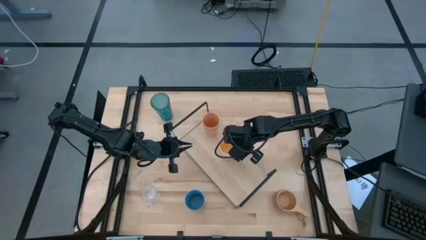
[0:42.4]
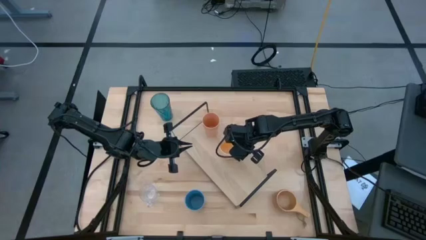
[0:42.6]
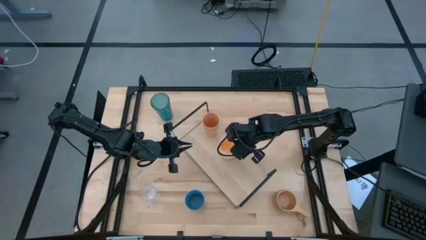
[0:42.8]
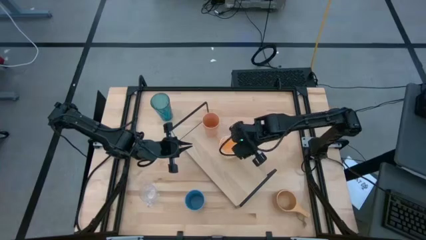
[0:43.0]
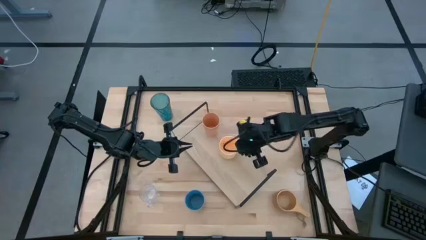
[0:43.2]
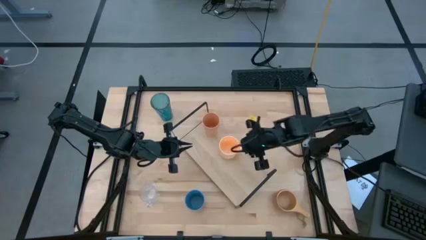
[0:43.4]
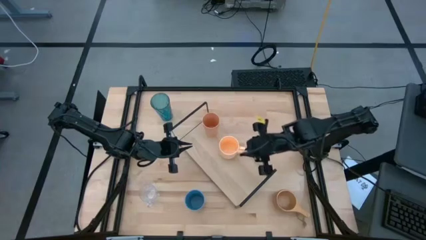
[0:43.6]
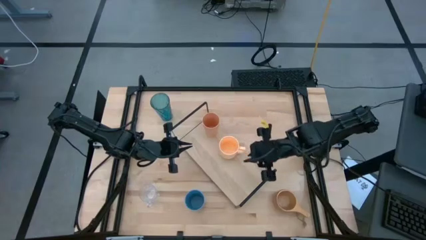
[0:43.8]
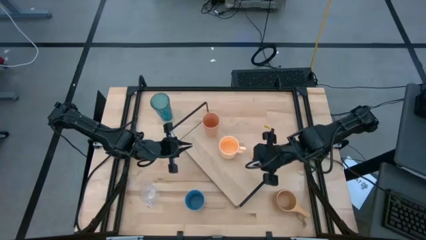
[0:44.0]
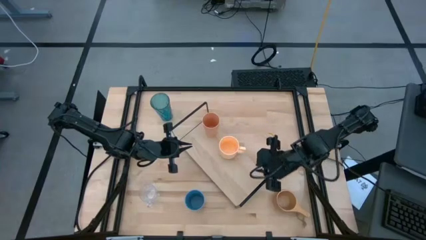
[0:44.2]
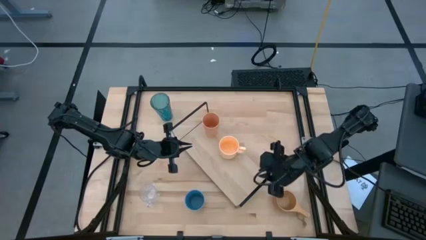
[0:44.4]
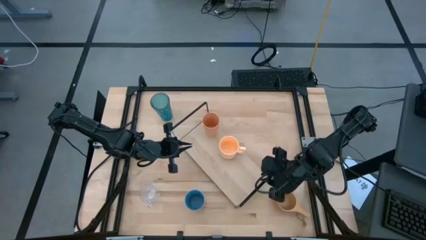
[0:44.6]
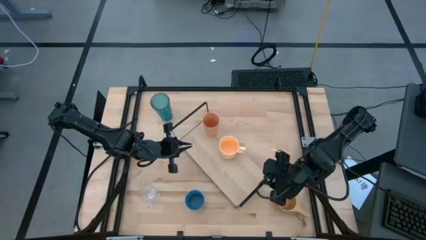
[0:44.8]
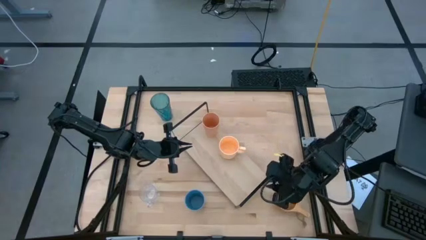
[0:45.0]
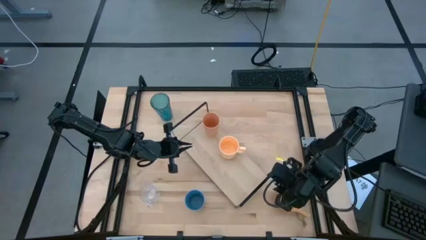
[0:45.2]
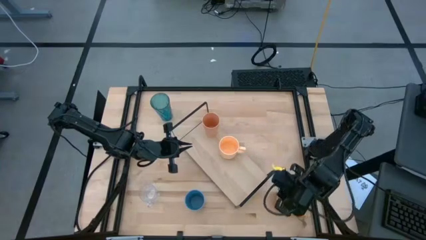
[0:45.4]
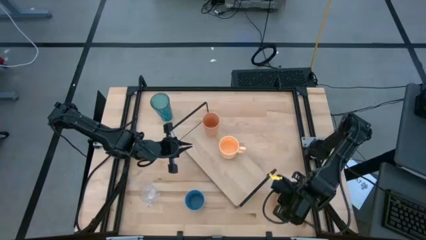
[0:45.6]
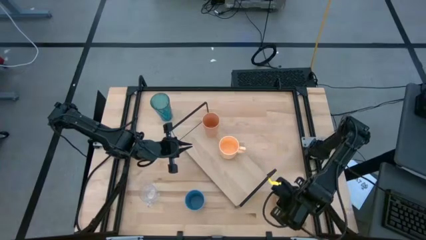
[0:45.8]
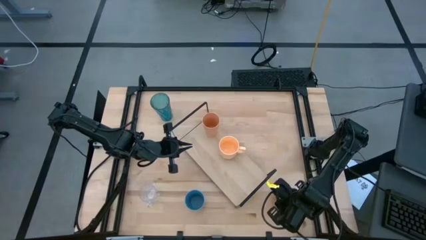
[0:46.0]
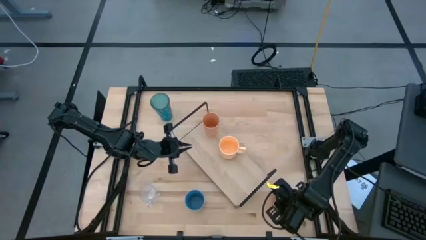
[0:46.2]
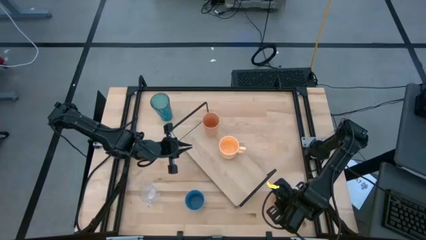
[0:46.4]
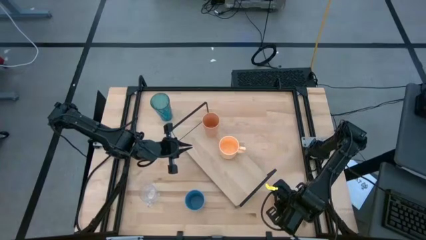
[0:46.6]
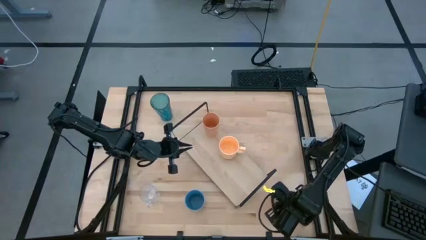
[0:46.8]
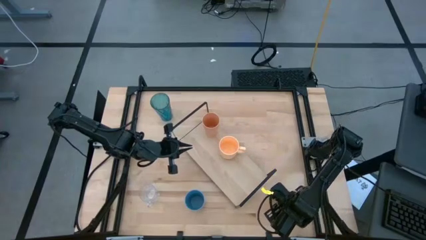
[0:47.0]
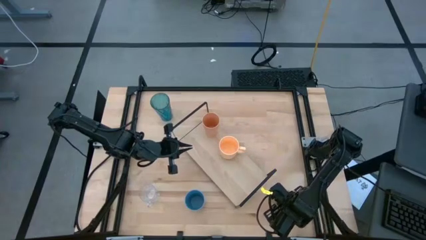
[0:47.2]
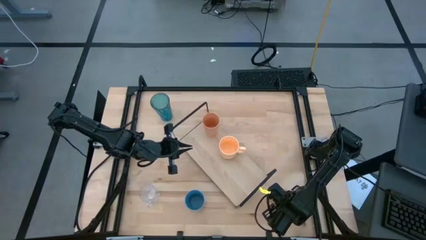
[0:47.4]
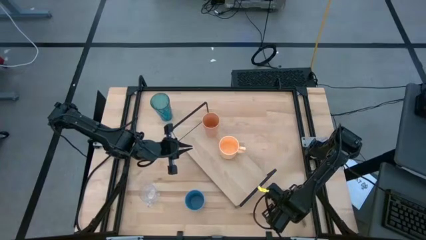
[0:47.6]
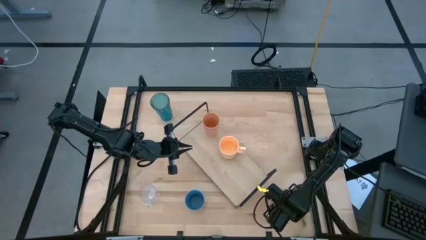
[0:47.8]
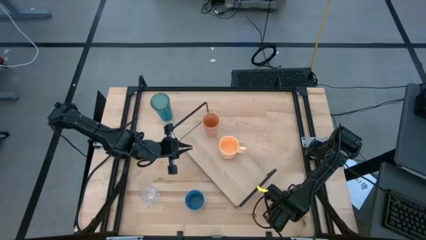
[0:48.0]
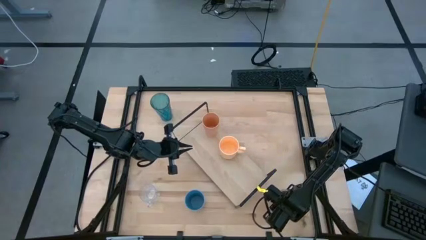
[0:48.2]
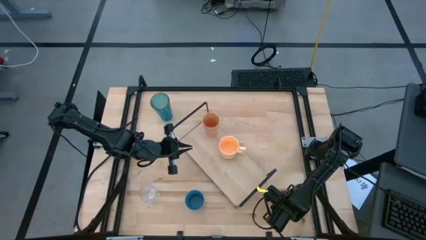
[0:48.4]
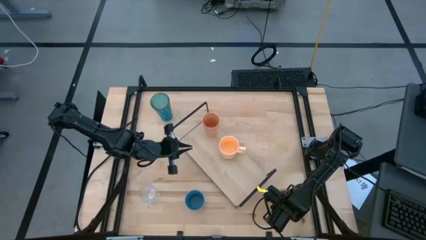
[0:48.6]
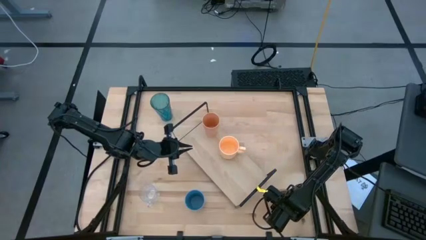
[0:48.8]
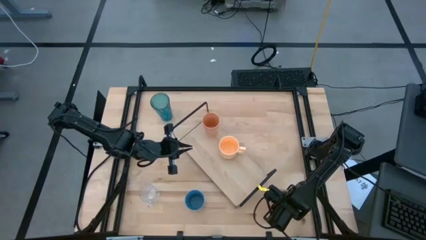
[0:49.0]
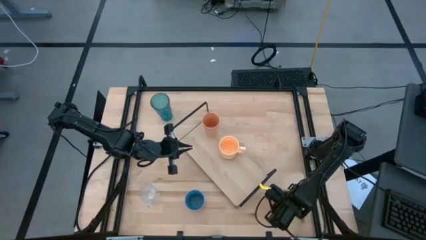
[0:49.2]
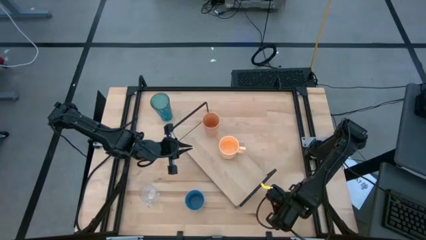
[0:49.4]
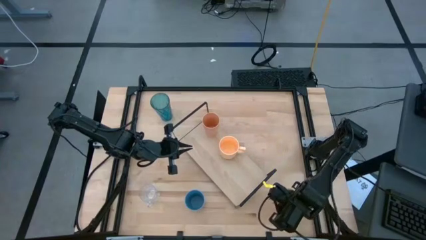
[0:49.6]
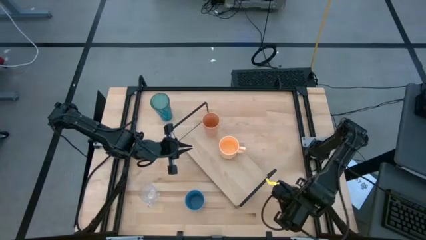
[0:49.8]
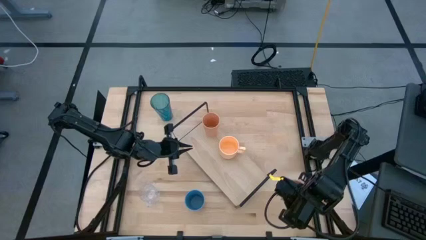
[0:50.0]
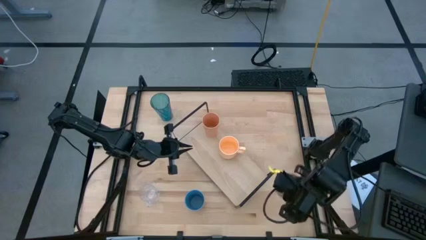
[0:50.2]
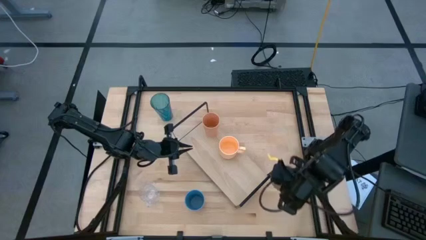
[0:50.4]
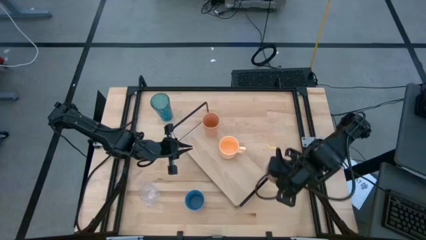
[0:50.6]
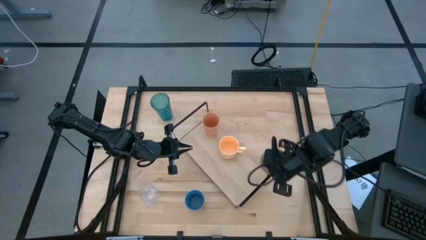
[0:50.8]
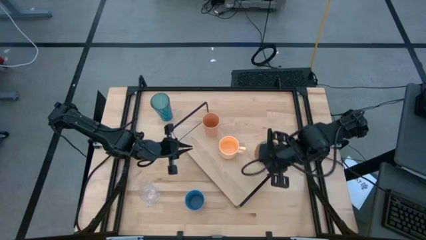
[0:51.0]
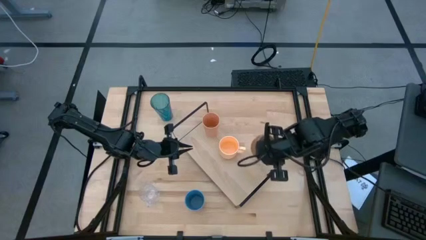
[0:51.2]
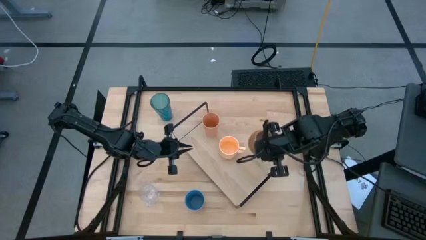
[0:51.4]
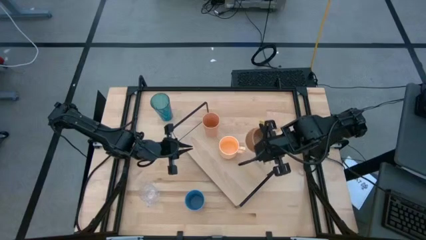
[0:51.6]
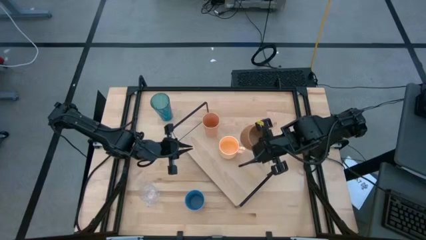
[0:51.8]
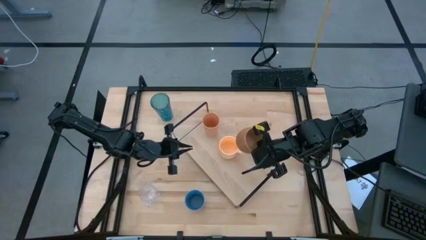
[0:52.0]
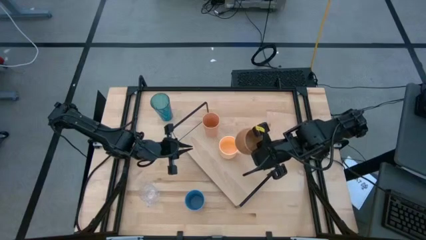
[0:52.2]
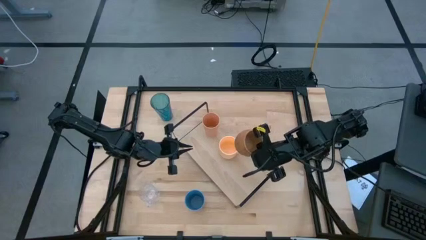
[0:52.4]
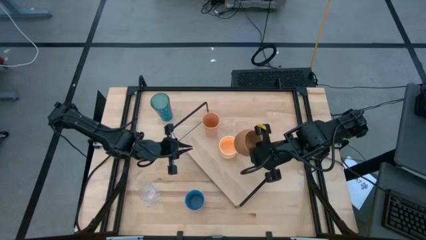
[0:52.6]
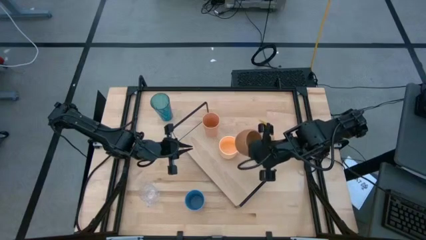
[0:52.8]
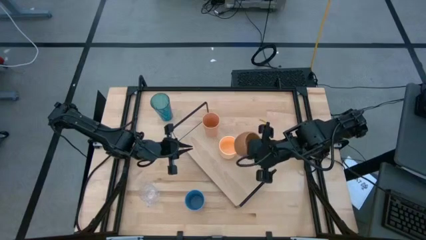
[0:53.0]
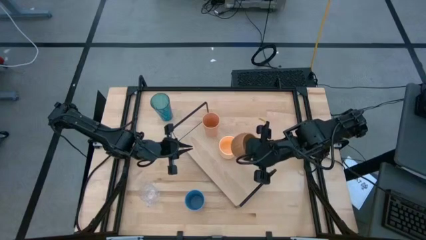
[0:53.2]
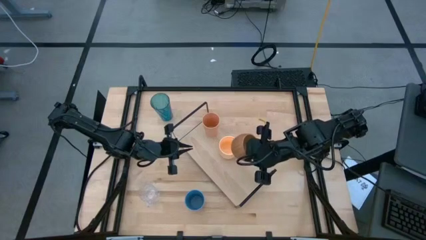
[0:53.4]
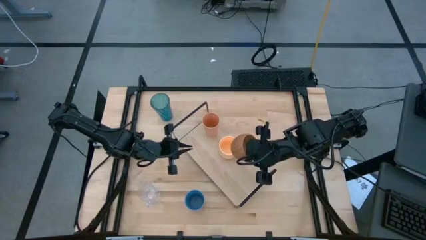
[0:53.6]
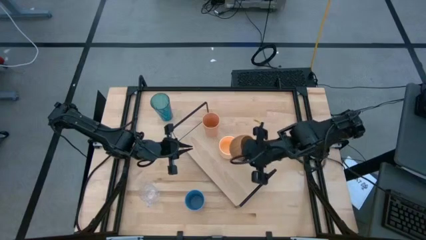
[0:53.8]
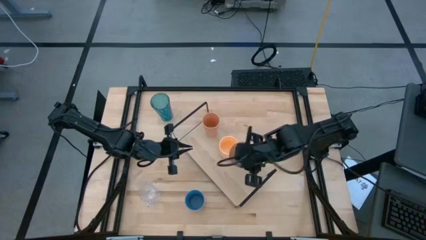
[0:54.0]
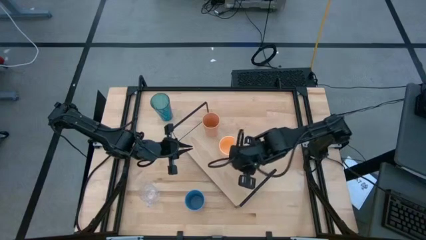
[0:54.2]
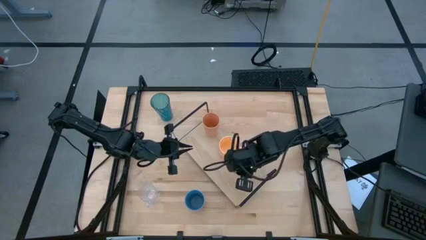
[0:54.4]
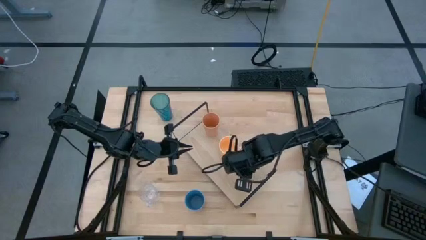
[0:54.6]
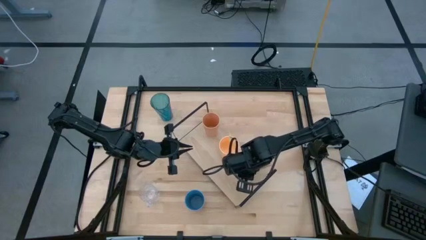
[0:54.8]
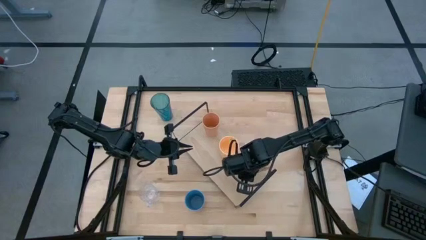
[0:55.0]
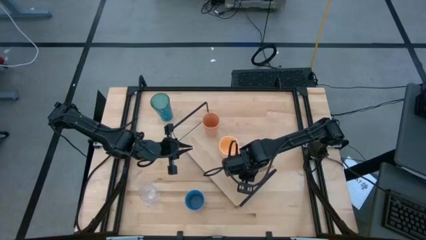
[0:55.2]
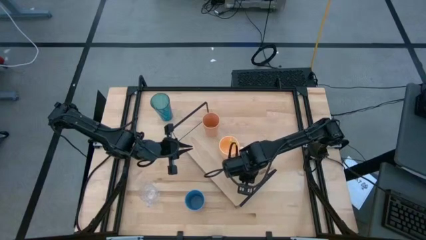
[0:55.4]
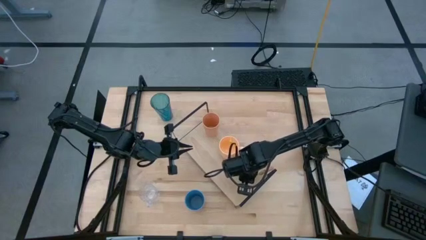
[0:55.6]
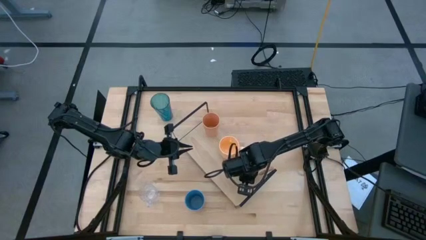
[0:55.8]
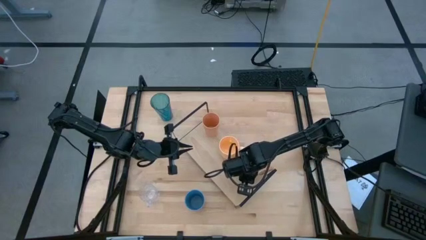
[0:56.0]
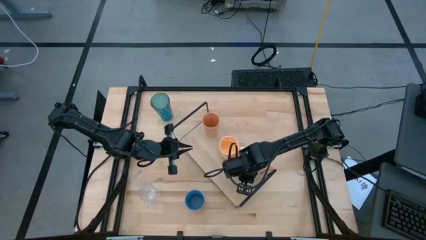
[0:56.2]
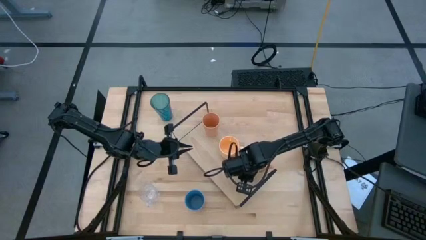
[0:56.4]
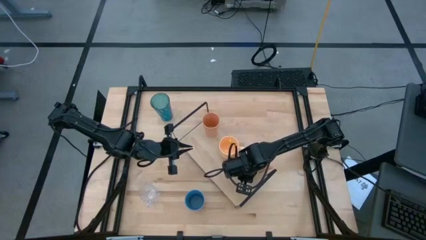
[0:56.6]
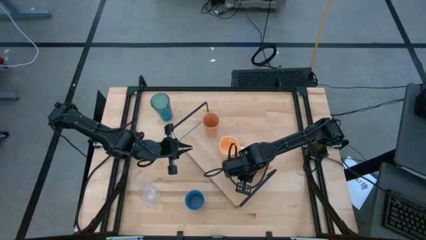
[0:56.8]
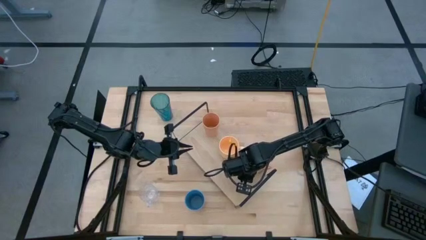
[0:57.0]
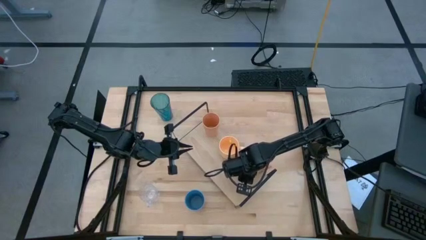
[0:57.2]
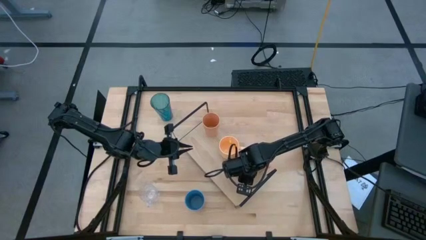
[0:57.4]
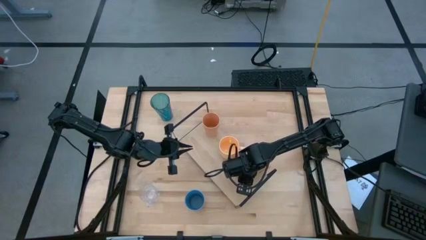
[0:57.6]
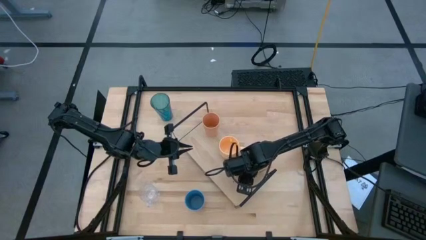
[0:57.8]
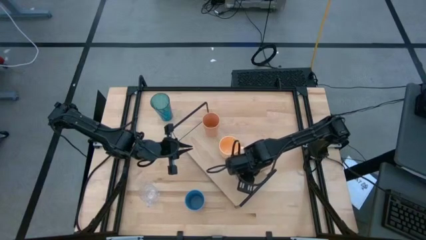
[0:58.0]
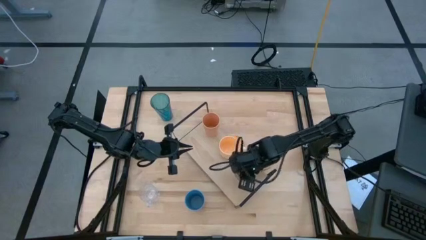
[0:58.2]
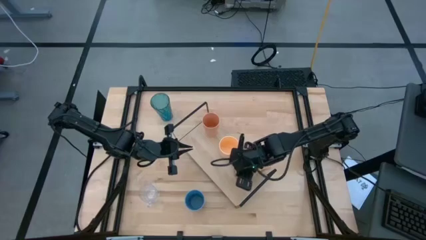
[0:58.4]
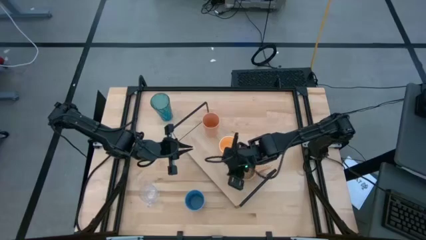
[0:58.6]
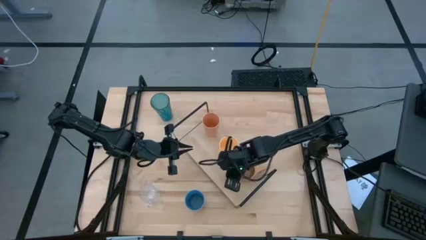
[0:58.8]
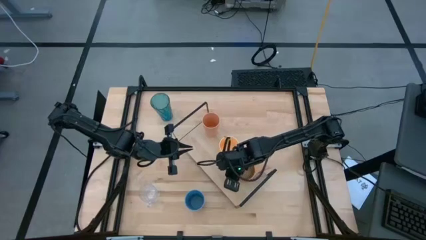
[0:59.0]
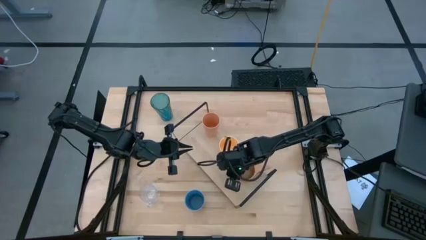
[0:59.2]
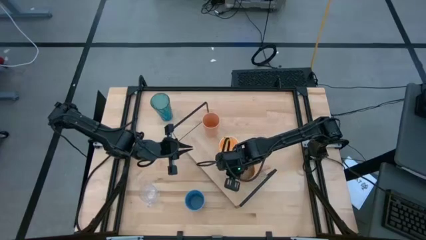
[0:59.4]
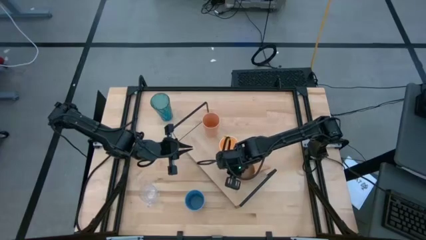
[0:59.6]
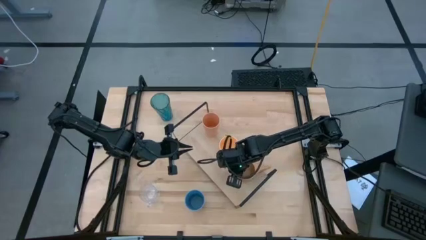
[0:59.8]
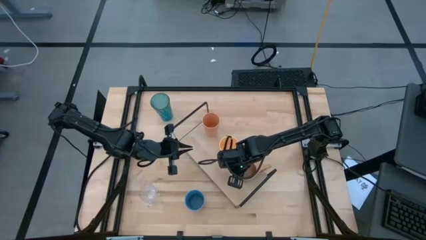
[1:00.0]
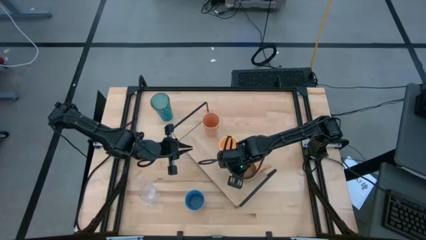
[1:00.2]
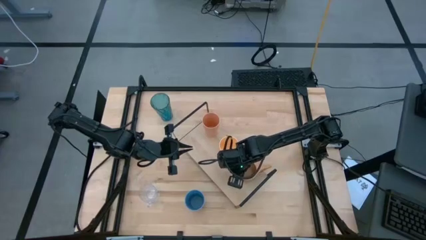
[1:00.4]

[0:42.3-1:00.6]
Task: Stack small to large cups/mugs on shelf
Put the brown mug on the shelf
